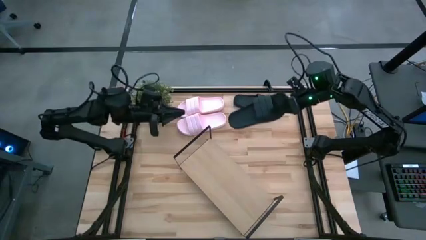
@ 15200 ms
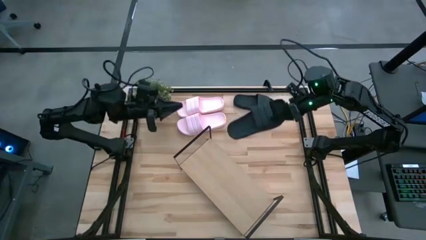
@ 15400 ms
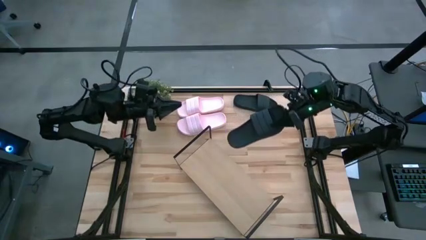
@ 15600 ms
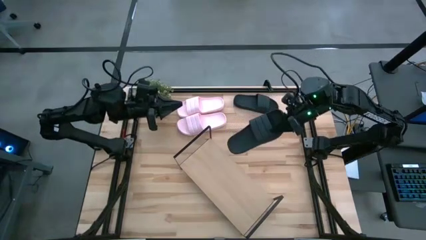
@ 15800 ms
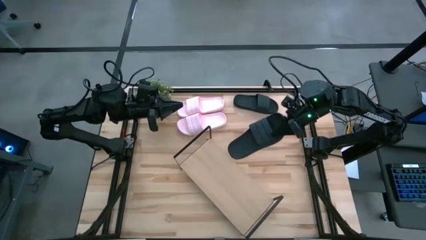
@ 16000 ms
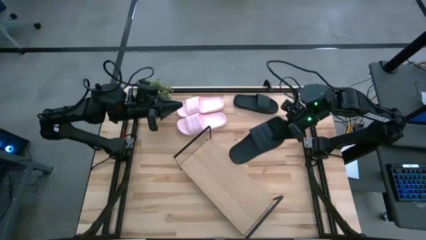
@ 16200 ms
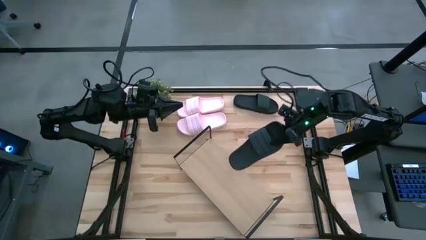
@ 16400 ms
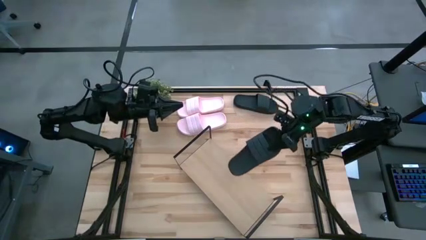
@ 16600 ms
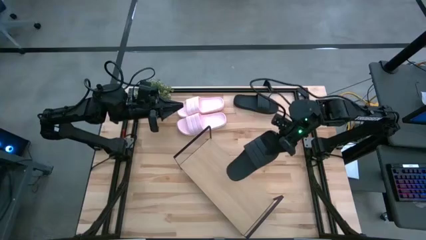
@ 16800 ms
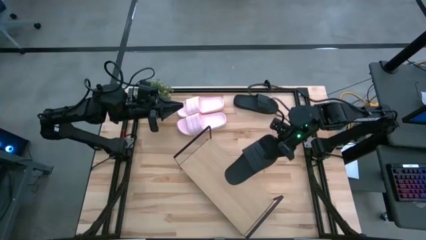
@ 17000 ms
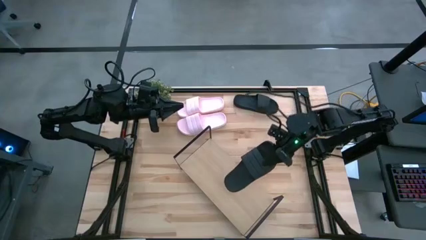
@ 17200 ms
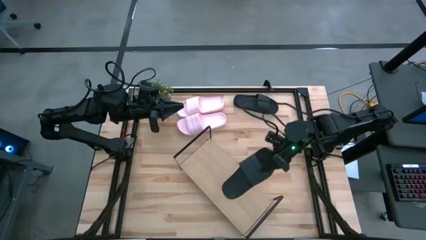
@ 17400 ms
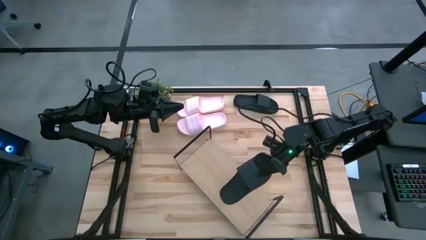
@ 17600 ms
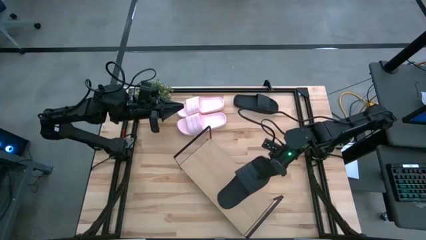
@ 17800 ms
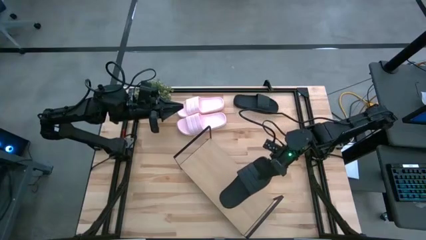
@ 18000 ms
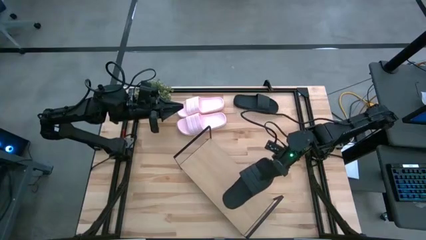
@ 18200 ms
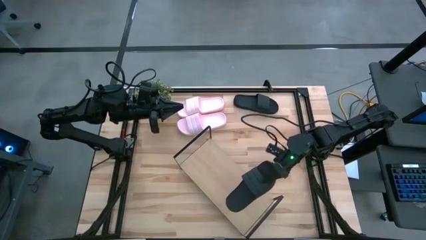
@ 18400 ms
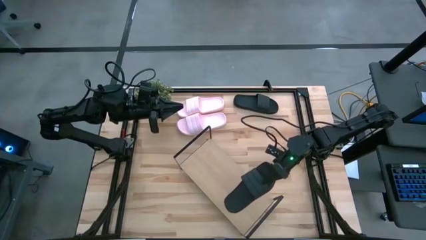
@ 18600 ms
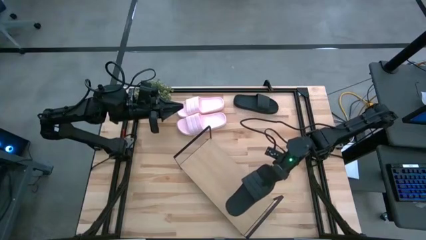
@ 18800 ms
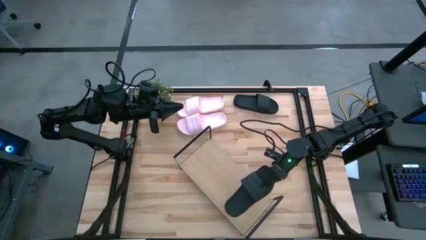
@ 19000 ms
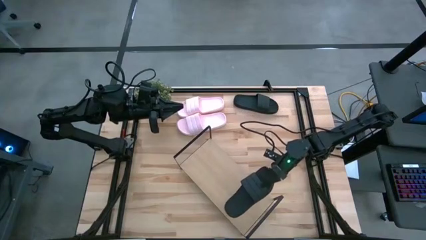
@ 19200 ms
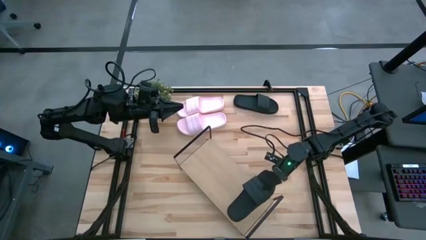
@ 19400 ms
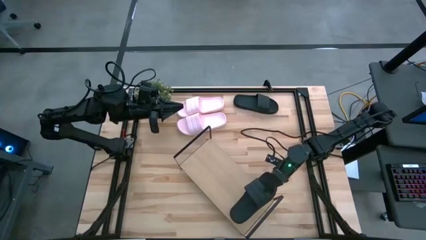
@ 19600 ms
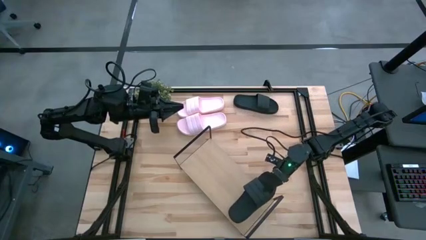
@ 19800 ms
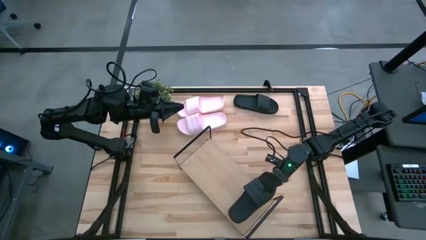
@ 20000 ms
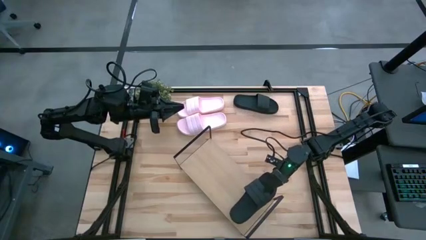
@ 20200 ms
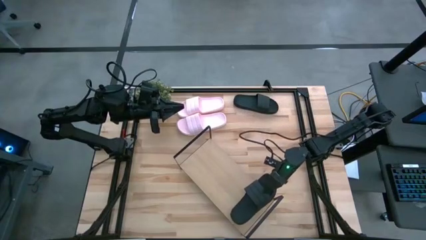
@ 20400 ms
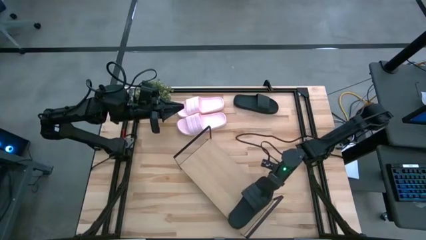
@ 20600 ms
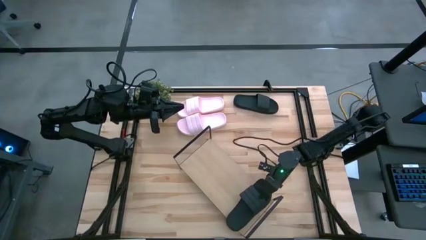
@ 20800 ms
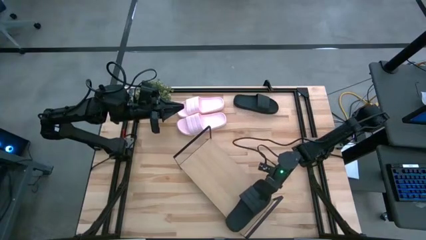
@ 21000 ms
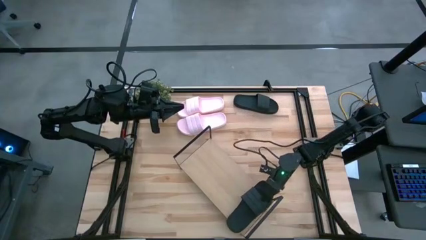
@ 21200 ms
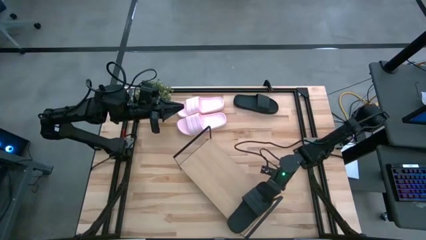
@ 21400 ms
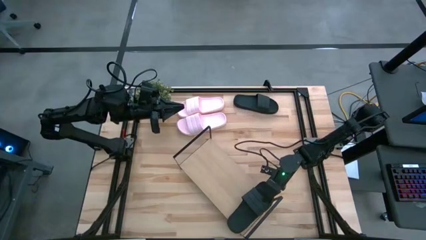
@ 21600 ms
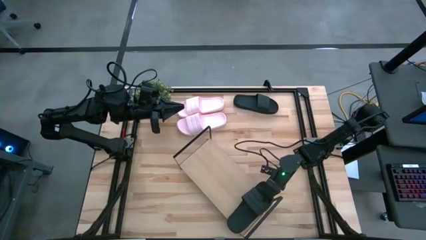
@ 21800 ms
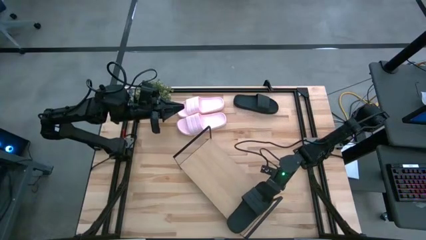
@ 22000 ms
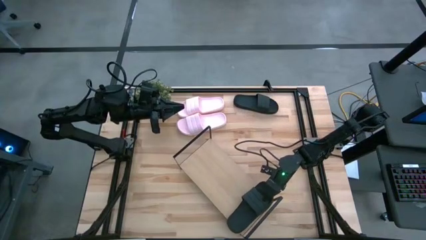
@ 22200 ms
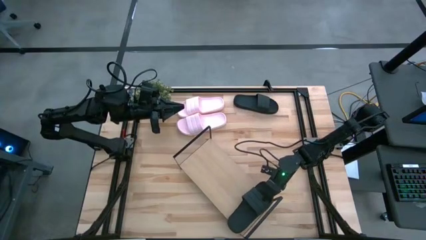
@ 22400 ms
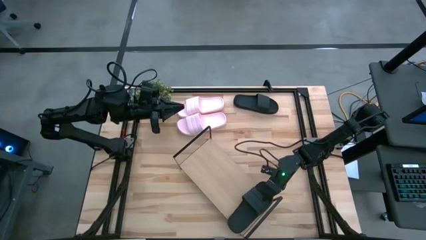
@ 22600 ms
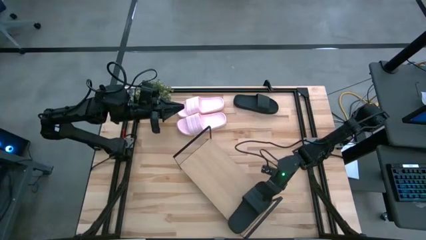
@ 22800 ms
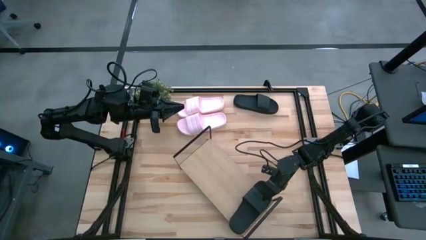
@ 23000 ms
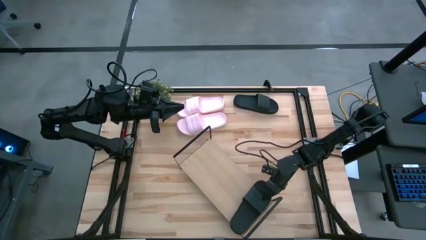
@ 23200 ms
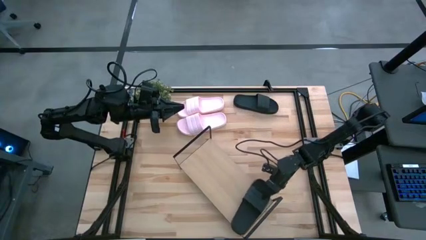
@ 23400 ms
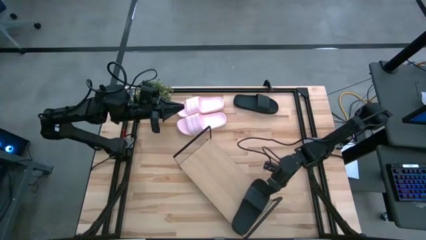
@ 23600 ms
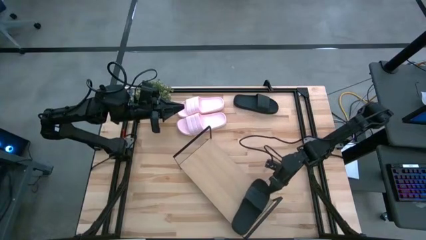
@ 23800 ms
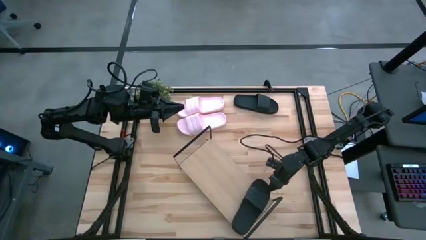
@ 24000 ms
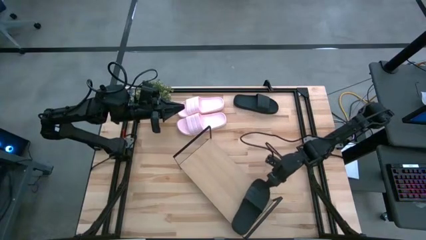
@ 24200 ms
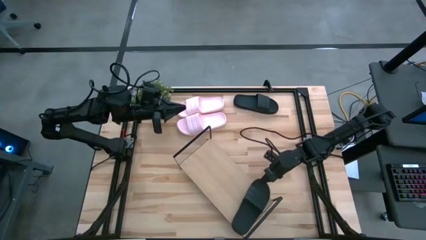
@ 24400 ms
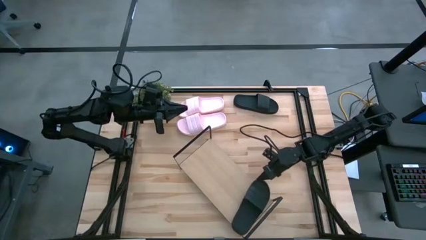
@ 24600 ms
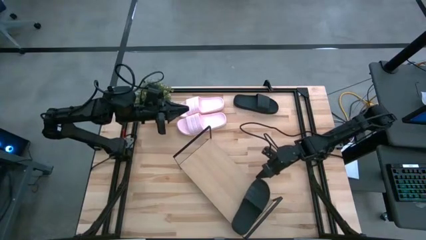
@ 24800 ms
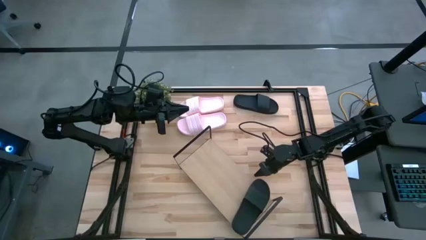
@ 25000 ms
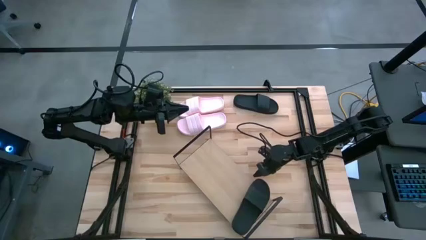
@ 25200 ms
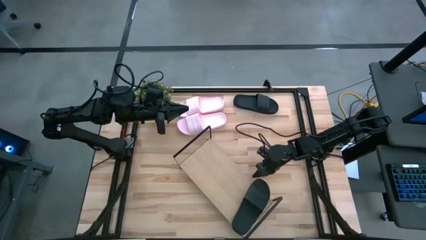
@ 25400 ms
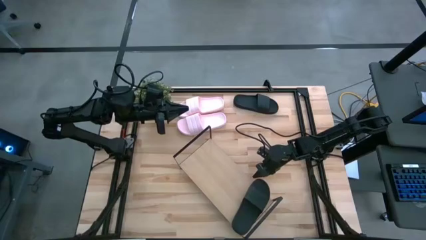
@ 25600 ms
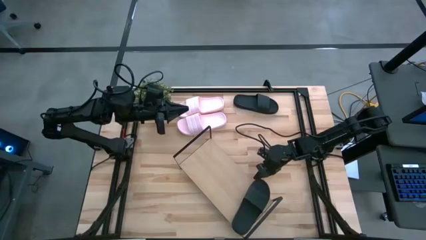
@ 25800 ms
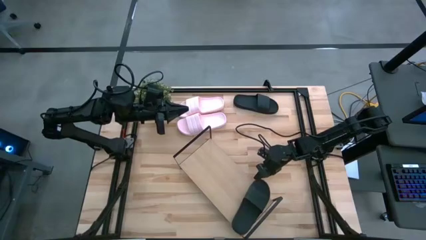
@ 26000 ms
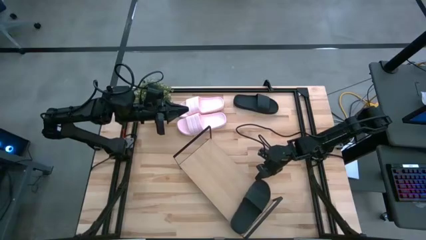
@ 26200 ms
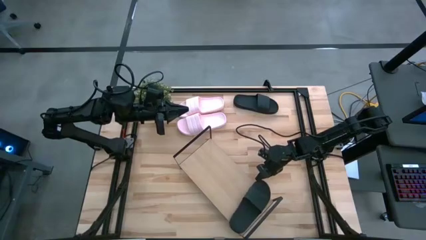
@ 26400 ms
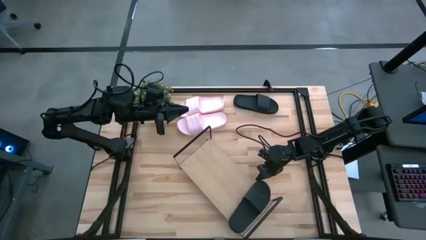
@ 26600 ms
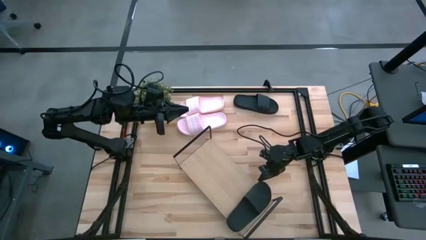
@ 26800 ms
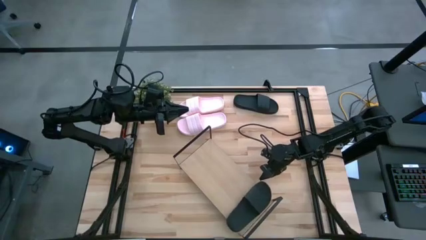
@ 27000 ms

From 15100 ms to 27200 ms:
Task: Pick and place slides into the shelf
Put the bottom black slipper on the shelf
